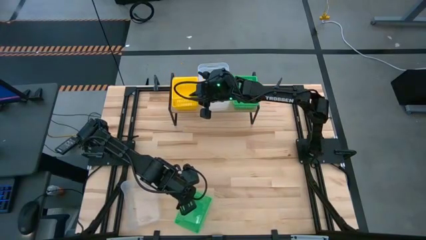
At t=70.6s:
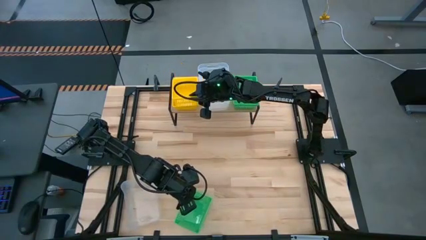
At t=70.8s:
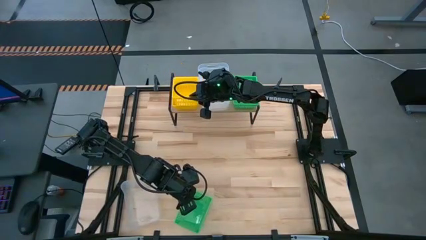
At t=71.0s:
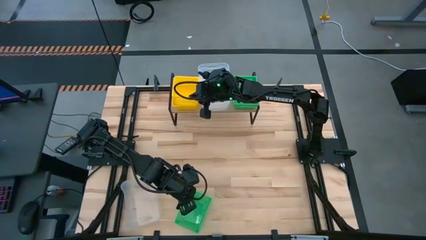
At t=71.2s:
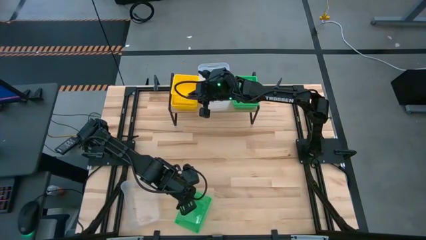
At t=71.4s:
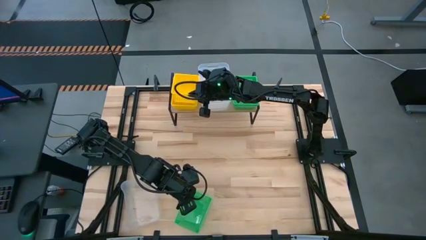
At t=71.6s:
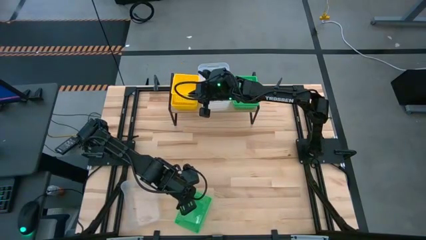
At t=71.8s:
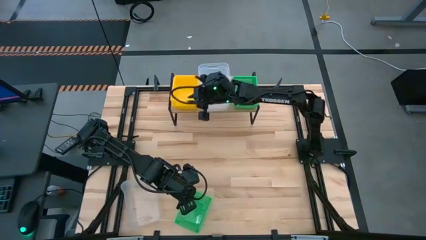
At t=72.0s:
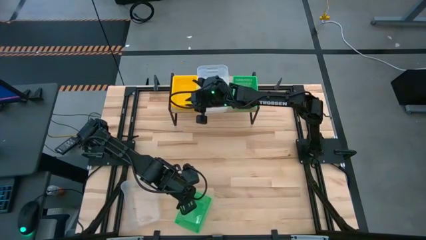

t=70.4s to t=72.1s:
Task: Stack baskets on shelf by color
Stack the yellow bin on top of the yellow bin on the shelf

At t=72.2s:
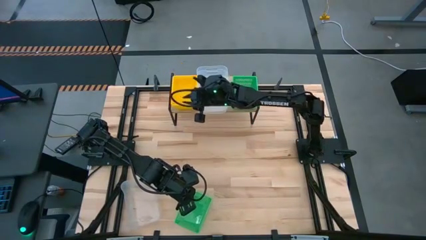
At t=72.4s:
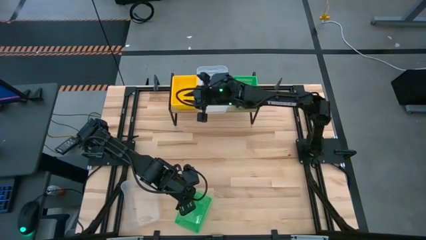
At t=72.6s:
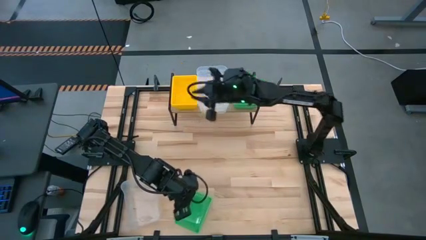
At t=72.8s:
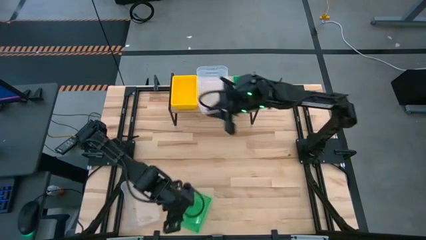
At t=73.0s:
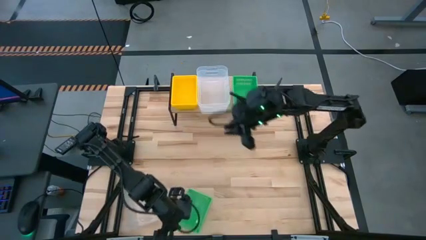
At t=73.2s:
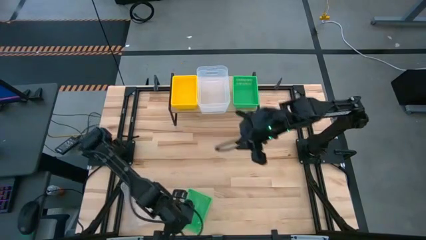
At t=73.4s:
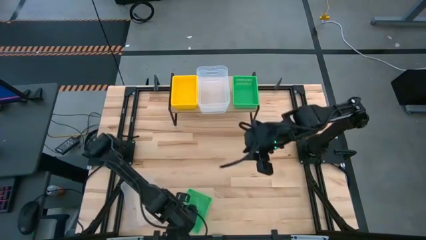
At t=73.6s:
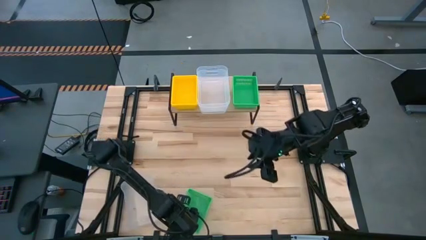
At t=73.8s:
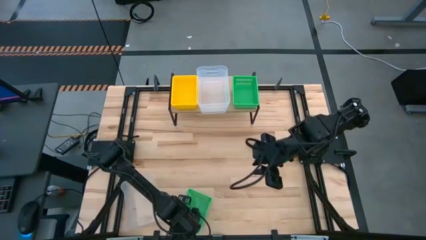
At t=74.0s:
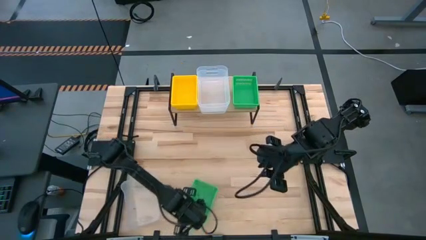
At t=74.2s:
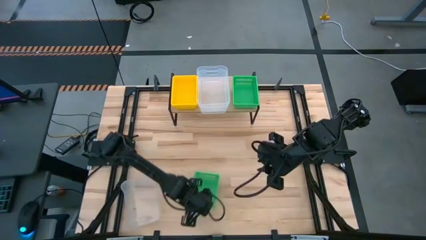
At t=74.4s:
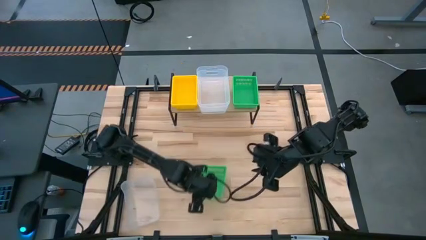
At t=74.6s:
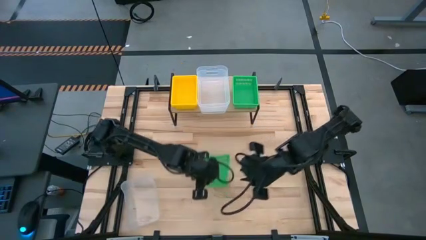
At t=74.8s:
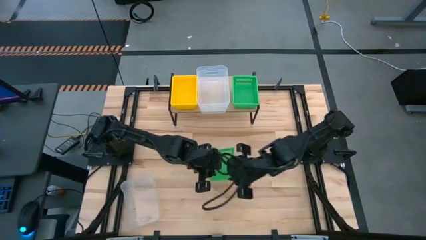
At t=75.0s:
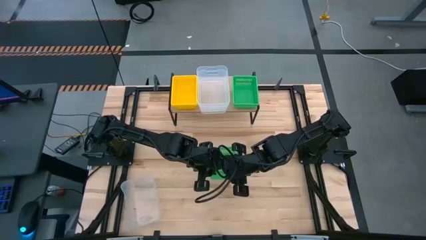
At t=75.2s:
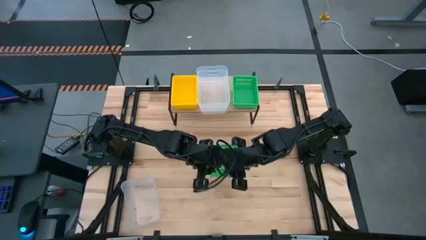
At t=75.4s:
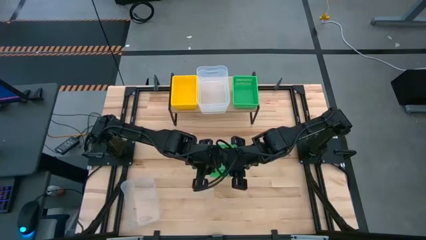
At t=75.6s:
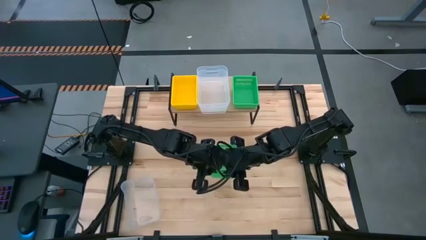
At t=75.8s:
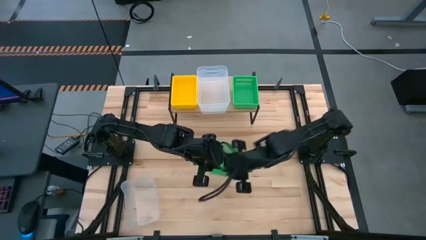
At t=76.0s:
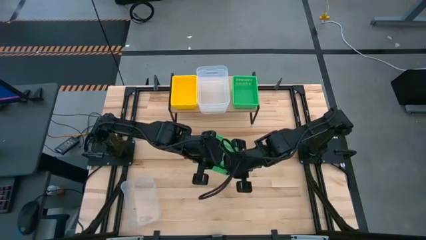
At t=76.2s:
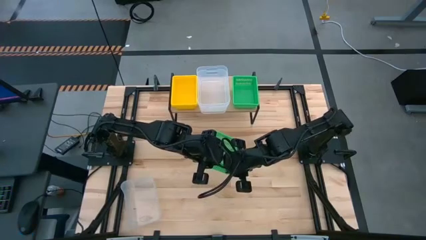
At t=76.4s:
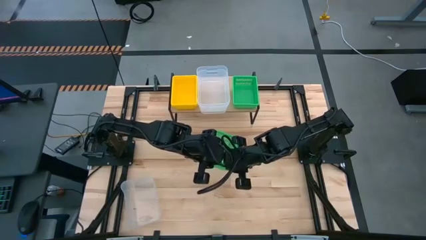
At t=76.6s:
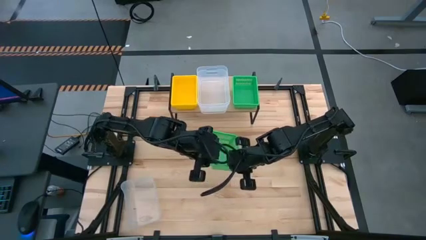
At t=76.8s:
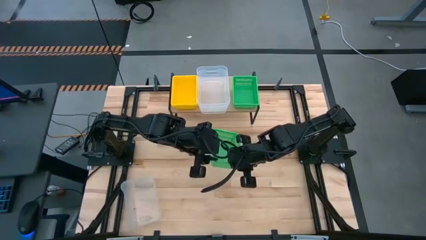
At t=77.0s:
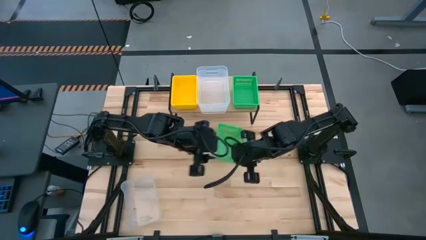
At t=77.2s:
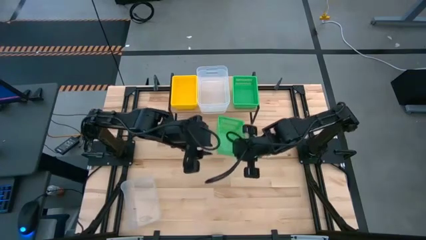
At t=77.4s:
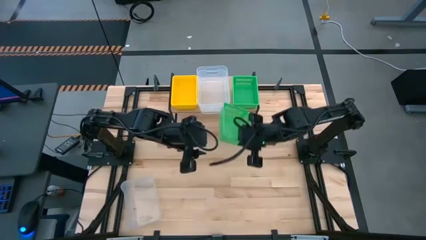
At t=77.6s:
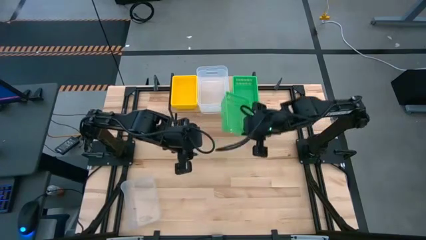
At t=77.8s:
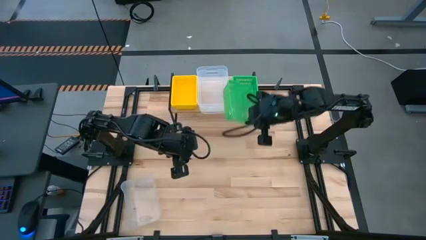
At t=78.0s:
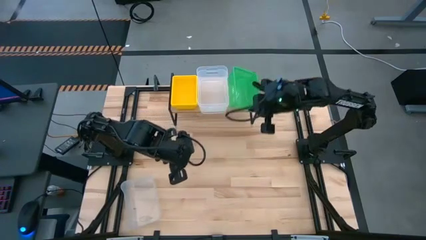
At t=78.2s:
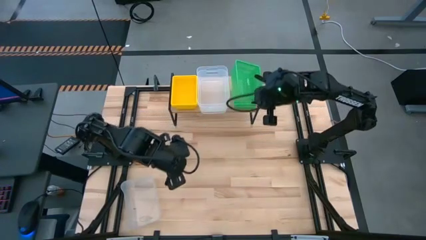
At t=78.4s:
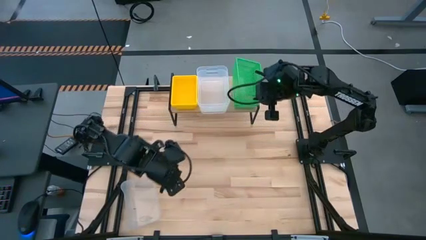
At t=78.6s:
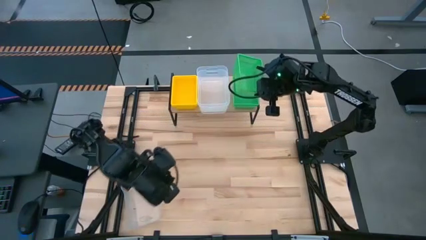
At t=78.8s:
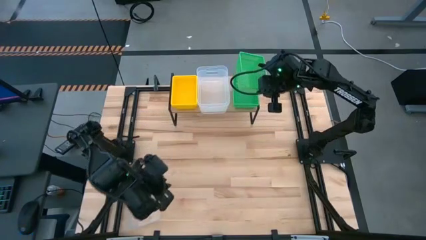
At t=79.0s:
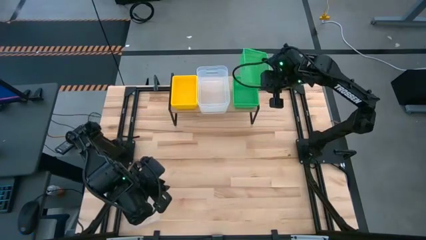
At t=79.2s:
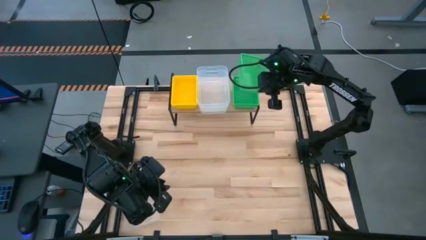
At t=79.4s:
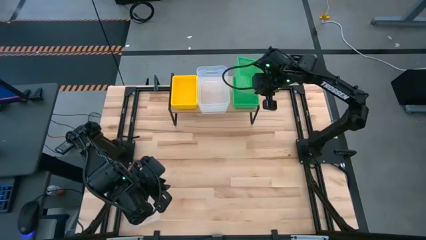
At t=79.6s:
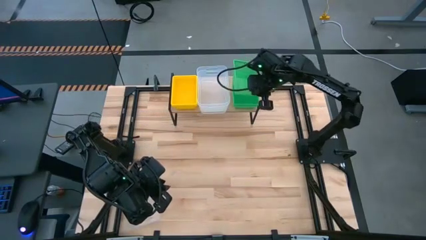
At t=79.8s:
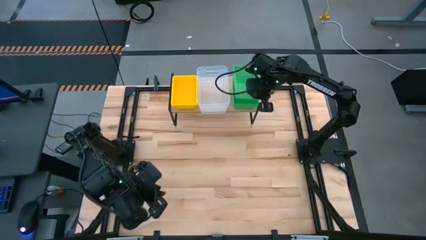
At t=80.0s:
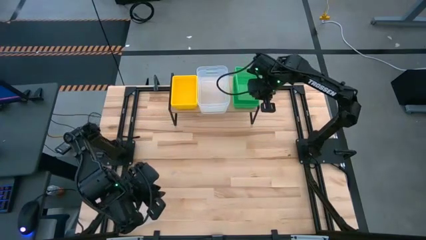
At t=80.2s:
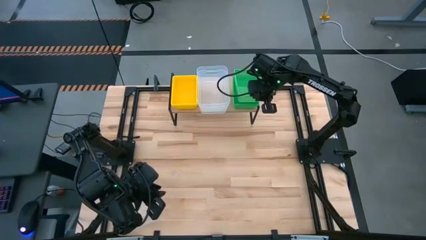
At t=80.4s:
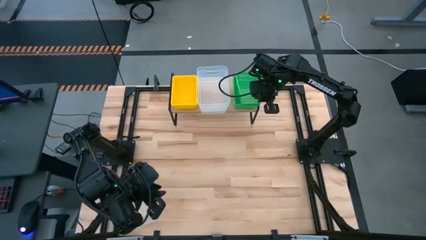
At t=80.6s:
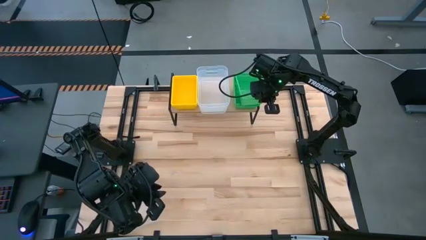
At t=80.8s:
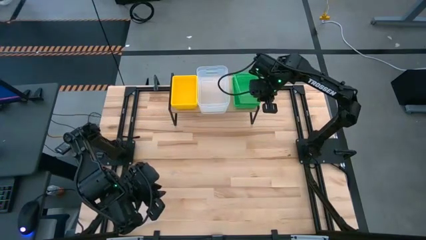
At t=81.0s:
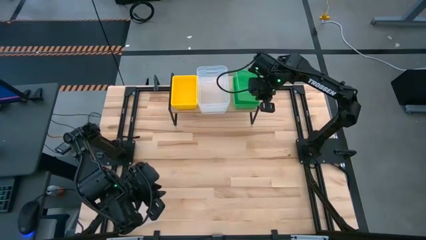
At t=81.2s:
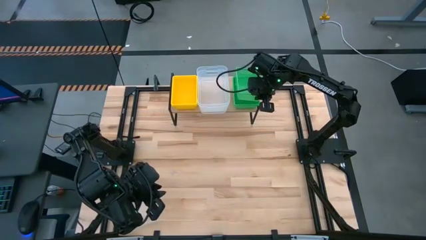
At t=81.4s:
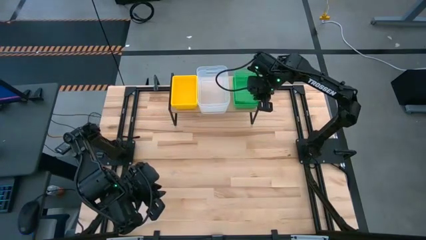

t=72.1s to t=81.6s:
Stack the green bin into the green bin on the shelf

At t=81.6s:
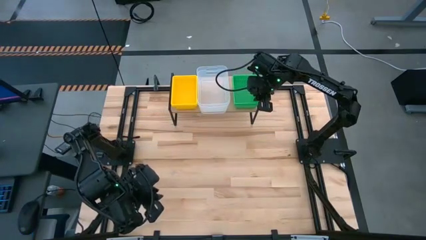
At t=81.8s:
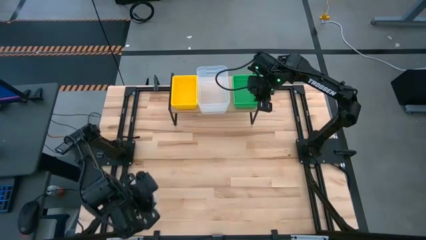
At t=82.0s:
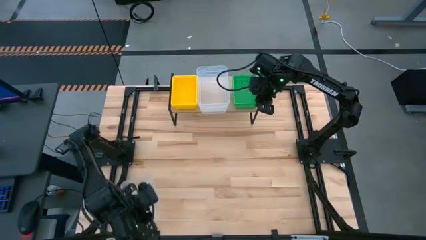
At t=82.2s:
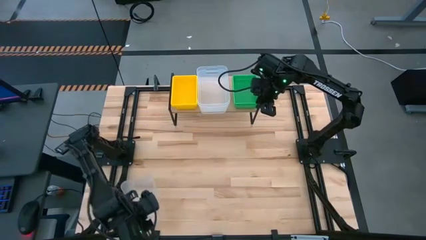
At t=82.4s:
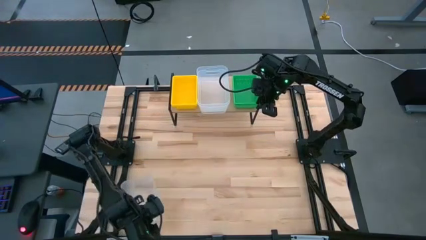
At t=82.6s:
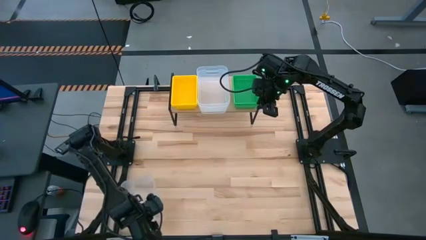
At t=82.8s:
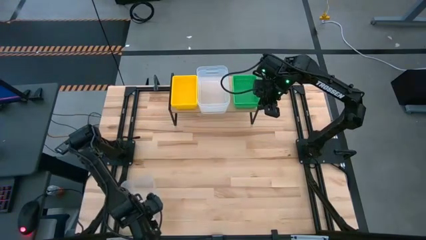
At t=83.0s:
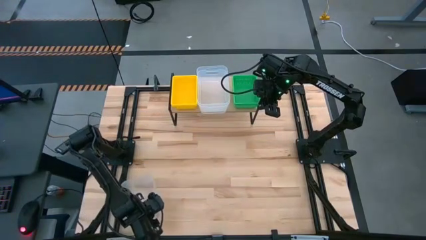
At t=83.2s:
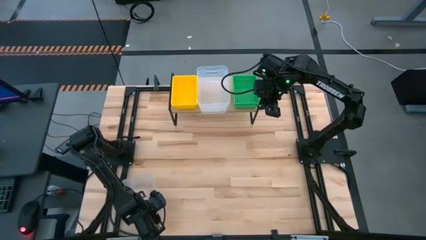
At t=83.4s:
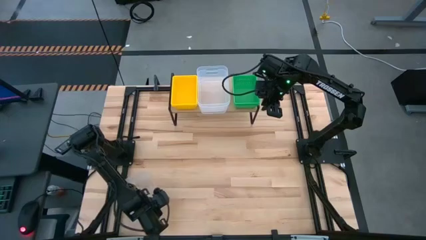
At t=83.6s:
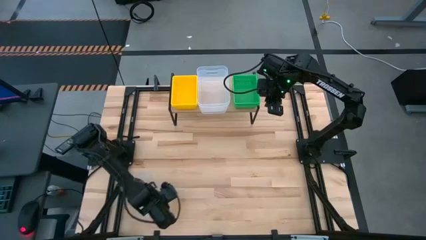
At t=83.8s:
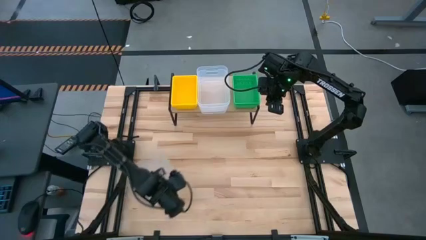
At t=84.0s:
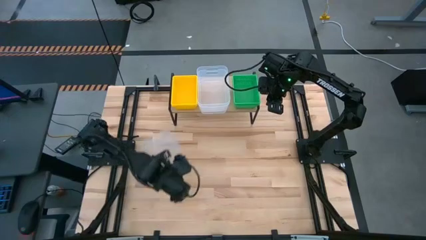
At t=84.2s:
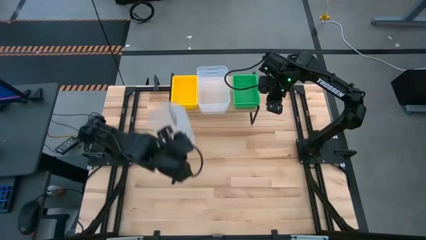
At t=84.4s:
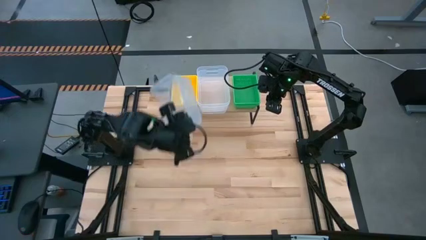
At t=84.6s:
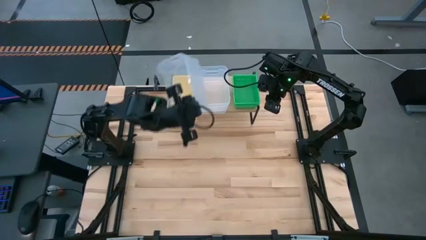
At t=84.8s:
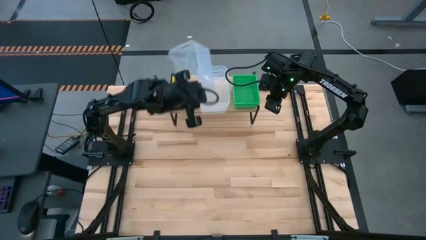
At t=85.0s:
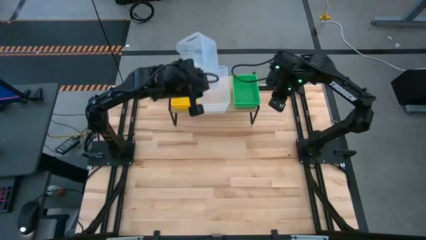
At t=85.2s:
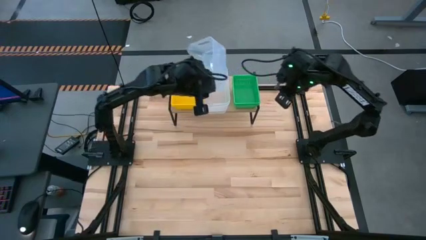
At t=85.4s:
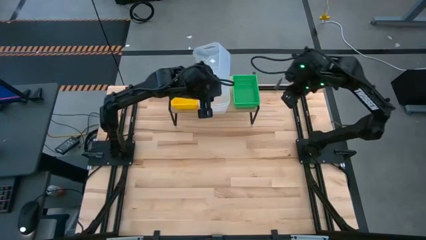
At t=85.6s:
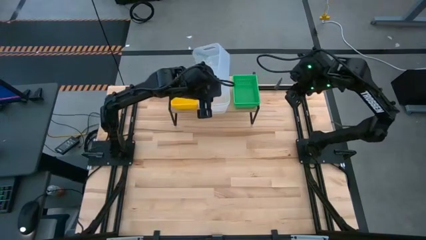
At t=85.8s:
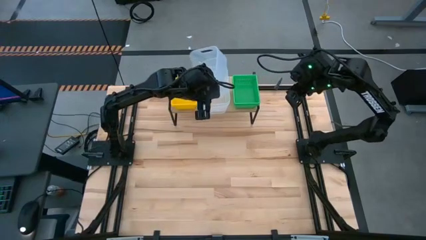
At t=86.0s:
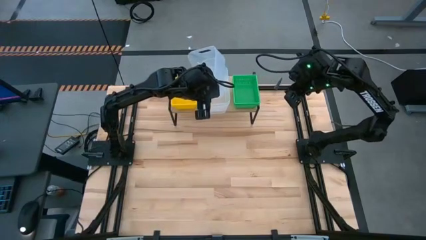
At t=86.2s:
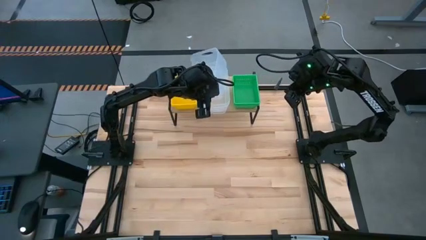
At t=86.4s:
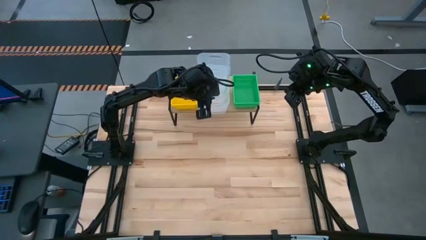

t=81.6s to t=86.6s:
Stack the transparent bin into the transparent bin on the shelf
